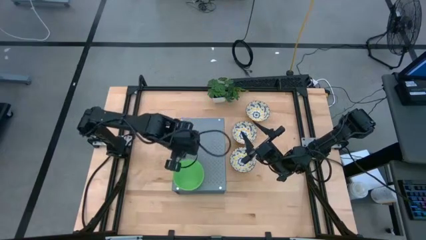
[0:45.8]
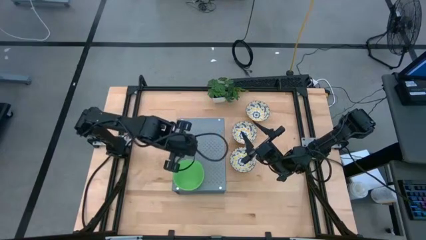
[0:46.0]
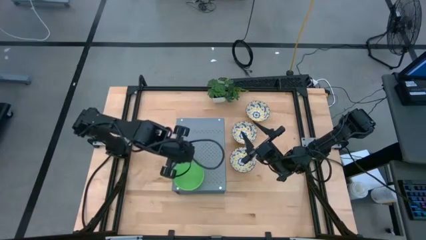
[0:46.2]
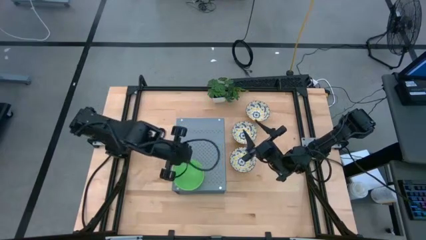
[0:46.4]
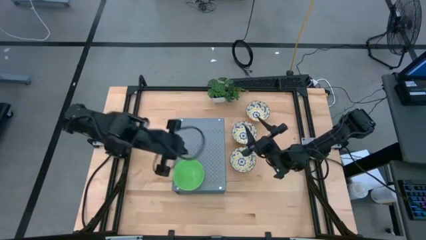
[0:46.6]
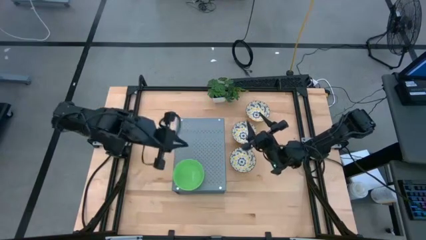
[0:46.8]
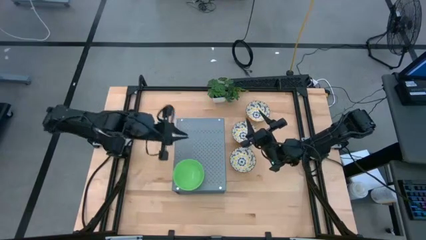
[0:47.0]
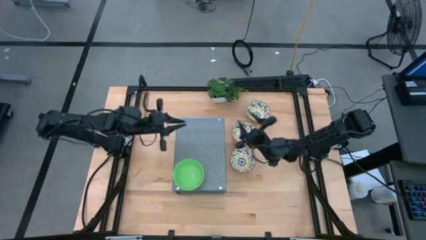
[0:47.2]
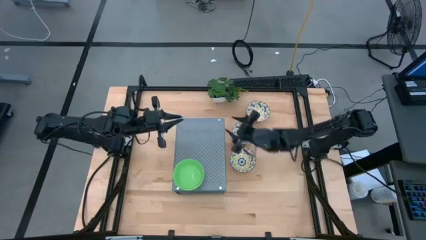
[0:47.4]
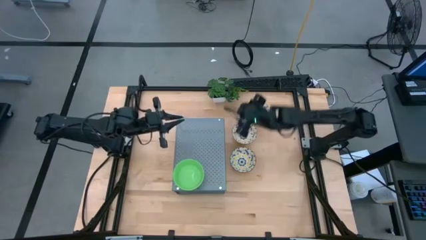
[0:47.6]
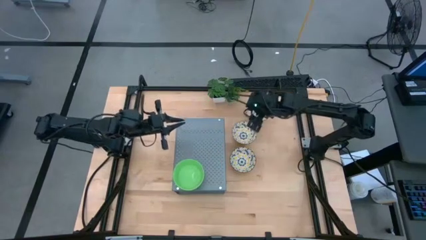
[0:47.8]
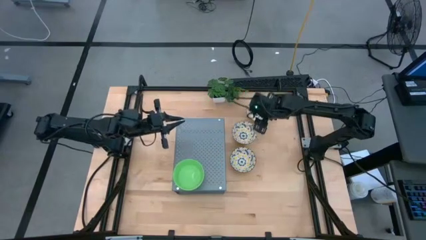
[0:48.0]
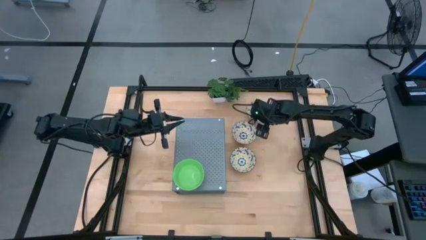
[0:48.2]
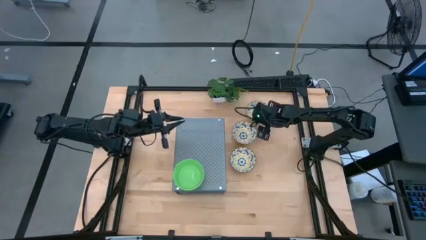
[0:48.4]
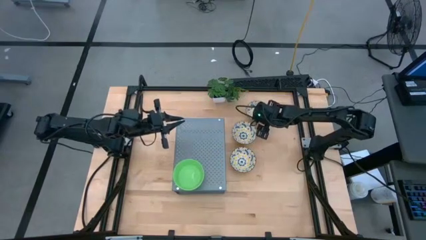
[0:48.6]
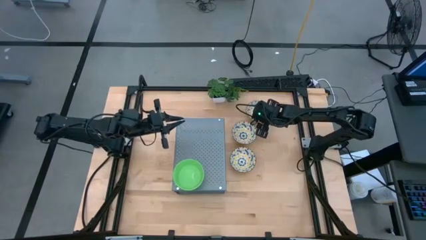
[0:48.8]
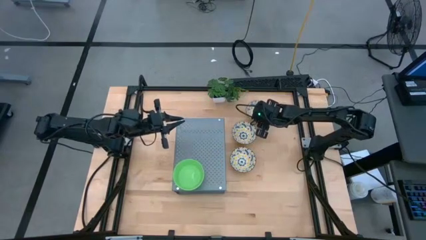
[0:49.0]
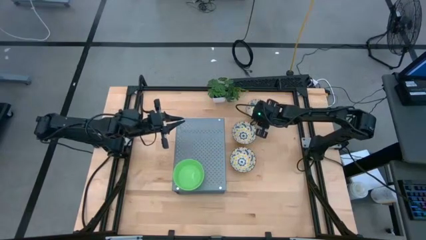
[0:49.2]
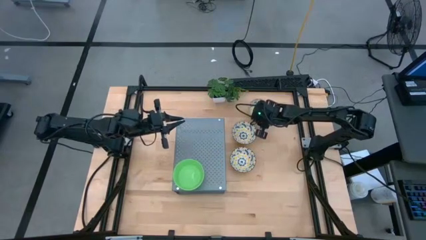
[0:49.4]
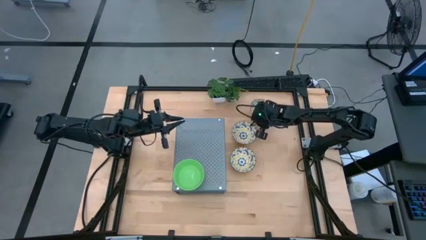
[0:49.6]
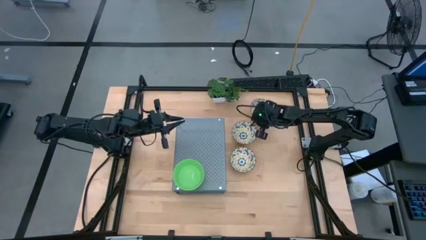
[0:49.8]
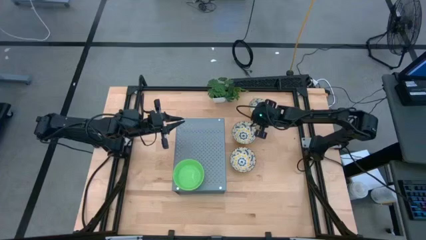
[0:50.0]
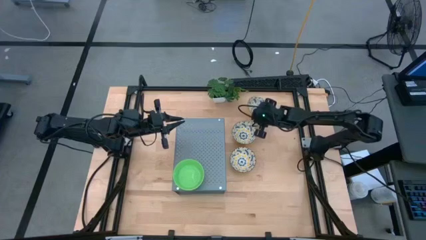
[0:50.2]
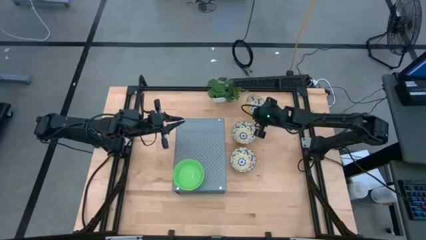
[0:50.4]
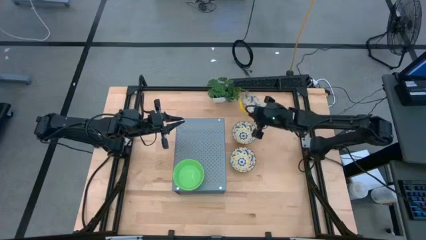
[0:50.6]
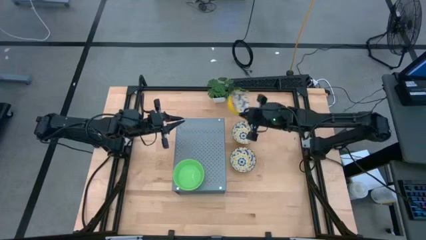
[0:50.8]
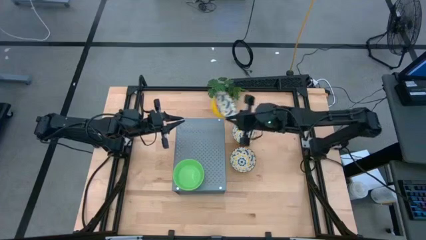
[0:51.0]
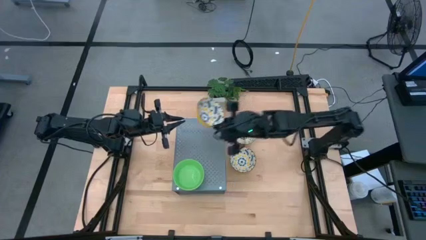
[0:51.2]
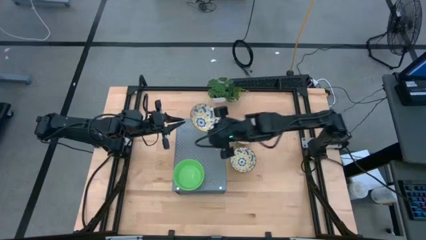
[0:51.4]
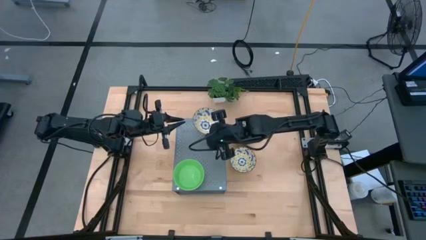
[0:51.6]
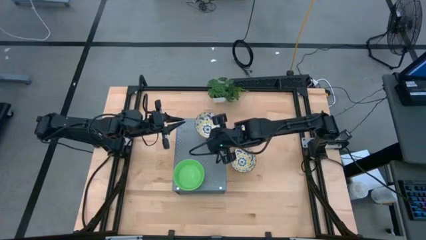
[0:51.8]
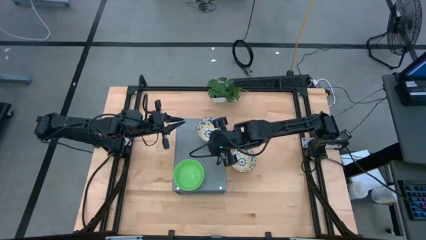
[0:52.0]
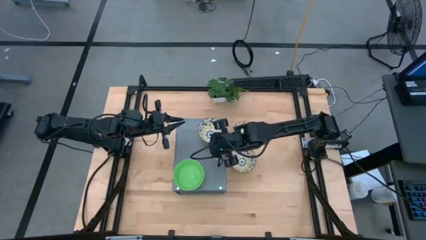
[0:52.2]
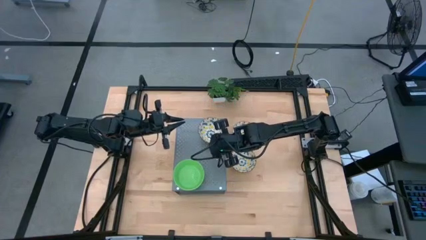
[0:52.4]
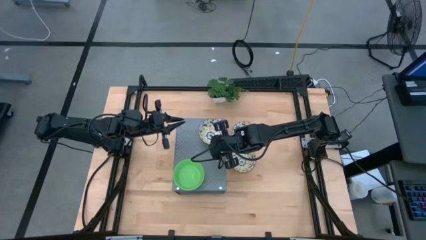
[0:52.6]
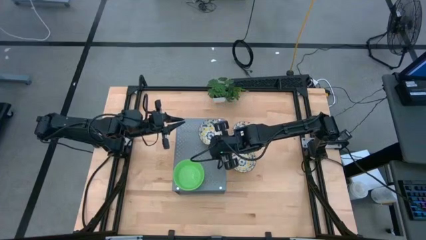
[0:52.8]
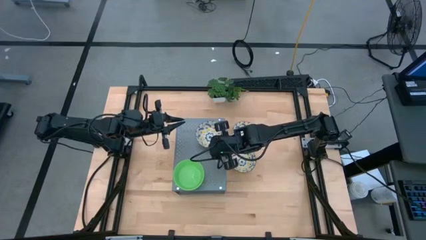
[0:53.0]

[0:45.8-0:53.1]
Task: Pick & Place Mini bowls
Put the top white patterned bowl on the shelf

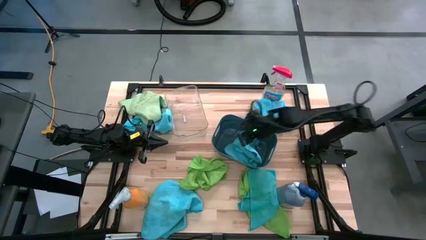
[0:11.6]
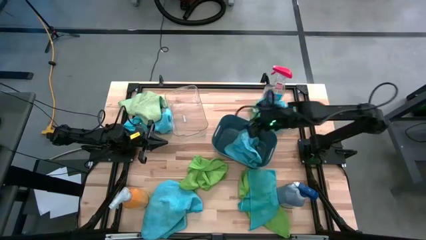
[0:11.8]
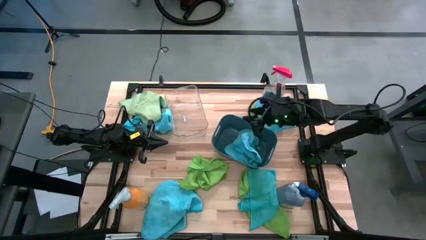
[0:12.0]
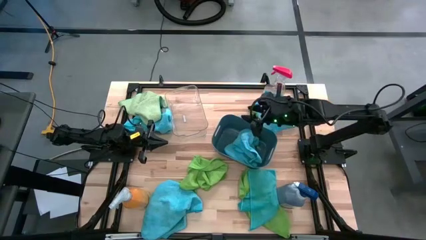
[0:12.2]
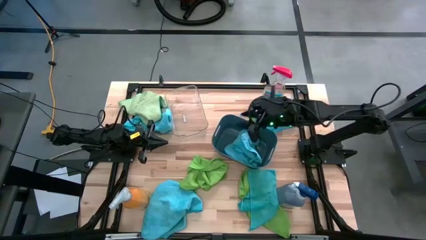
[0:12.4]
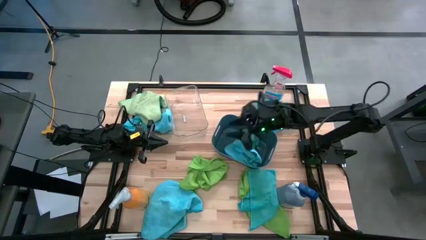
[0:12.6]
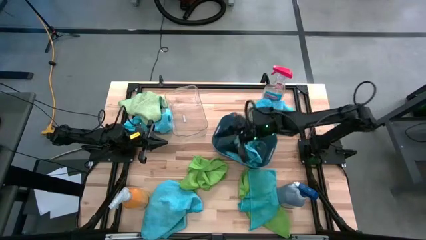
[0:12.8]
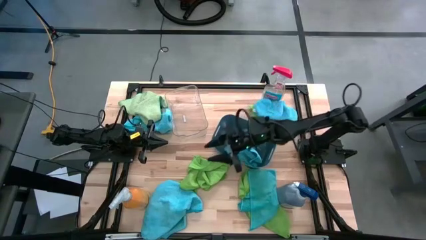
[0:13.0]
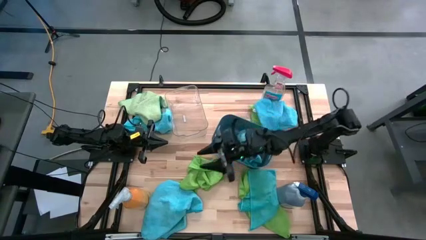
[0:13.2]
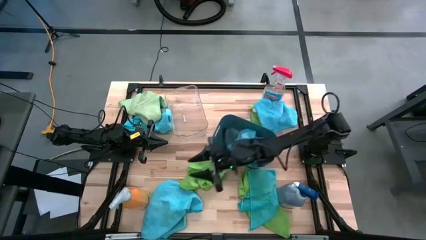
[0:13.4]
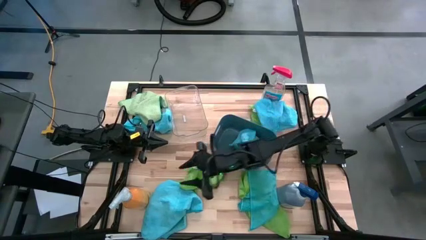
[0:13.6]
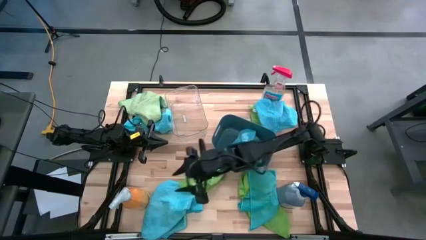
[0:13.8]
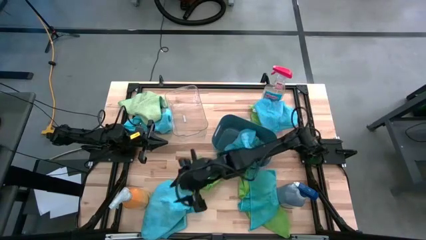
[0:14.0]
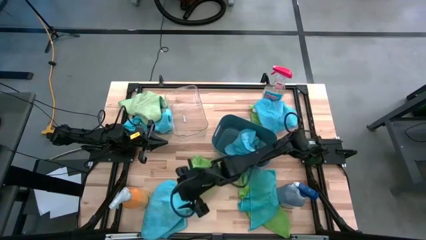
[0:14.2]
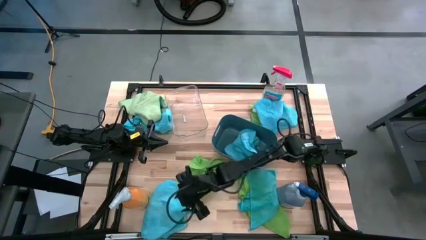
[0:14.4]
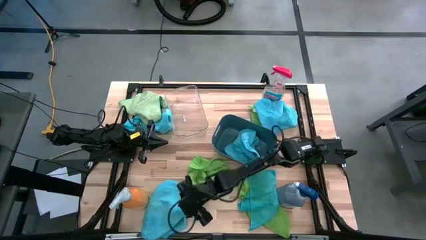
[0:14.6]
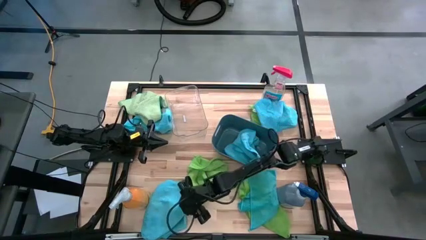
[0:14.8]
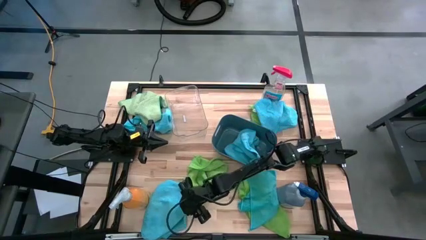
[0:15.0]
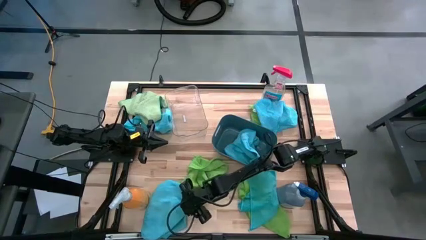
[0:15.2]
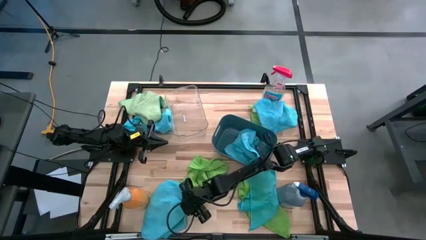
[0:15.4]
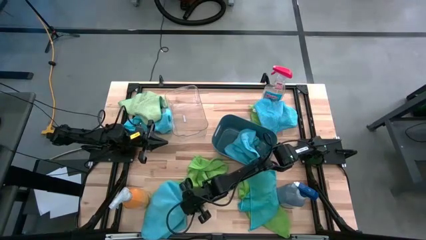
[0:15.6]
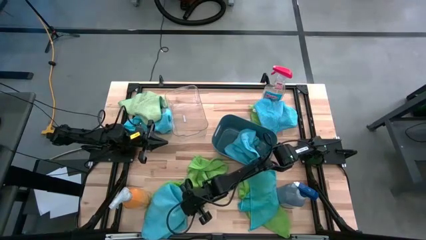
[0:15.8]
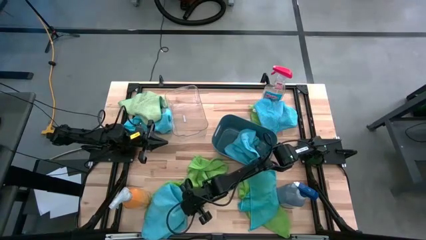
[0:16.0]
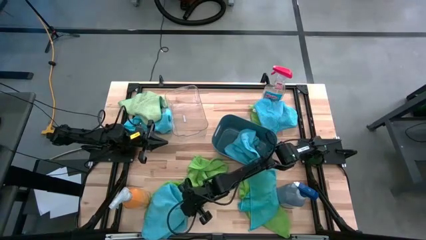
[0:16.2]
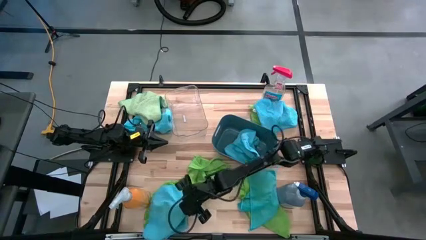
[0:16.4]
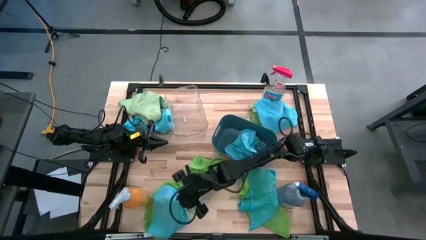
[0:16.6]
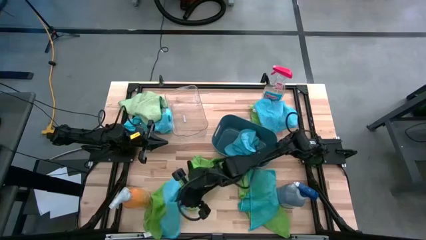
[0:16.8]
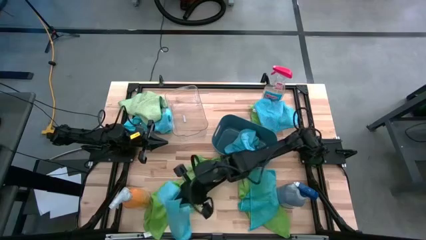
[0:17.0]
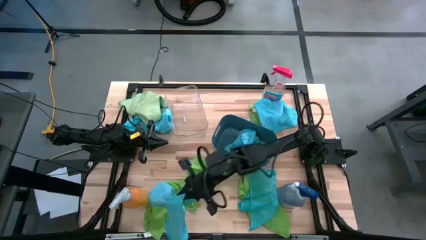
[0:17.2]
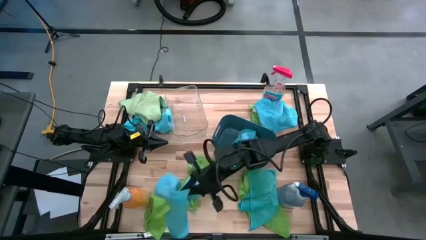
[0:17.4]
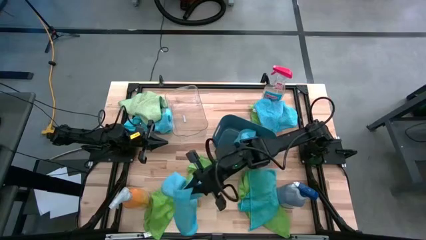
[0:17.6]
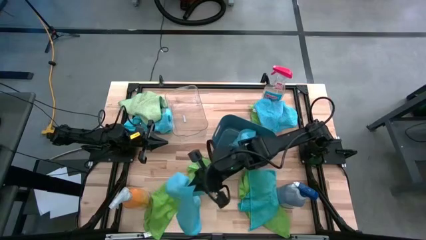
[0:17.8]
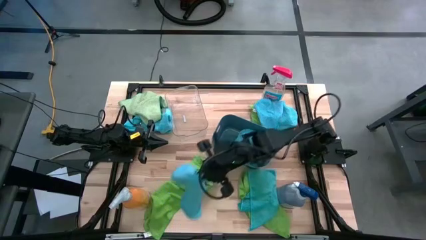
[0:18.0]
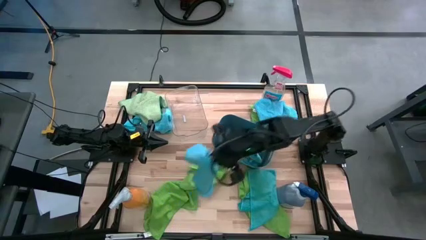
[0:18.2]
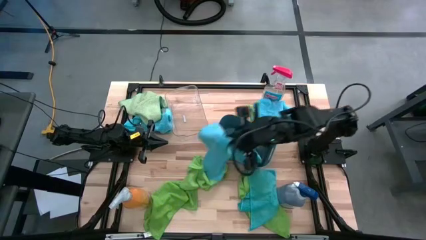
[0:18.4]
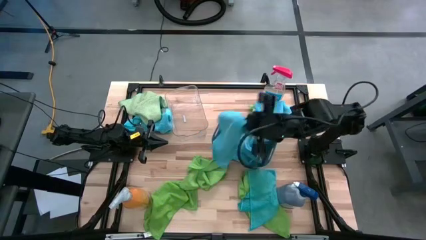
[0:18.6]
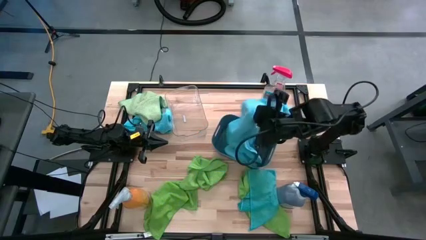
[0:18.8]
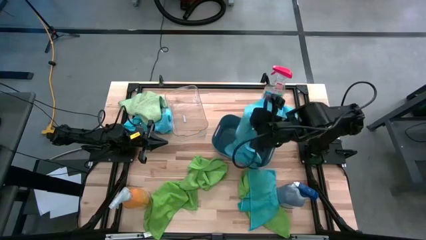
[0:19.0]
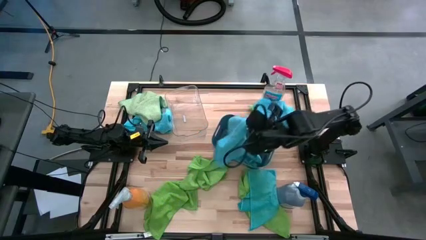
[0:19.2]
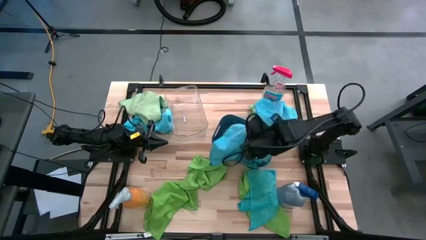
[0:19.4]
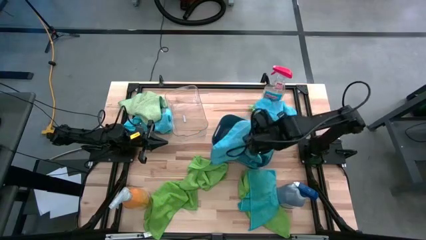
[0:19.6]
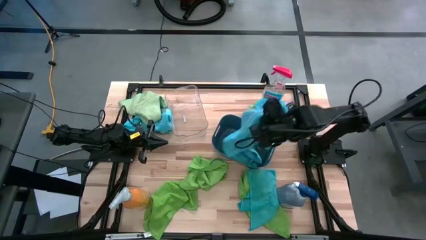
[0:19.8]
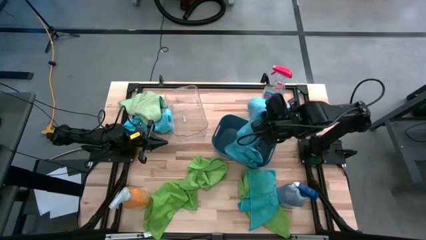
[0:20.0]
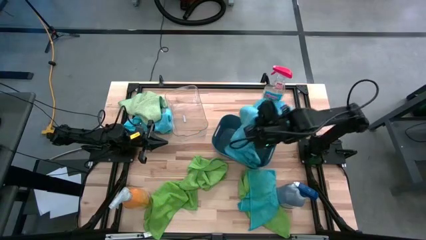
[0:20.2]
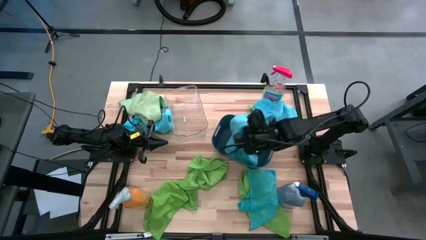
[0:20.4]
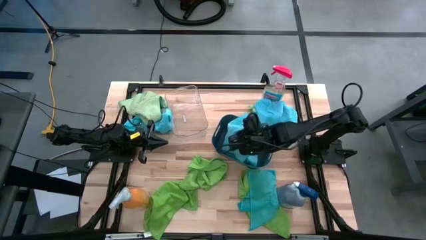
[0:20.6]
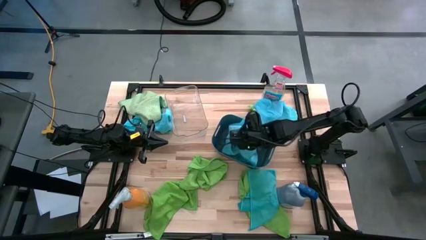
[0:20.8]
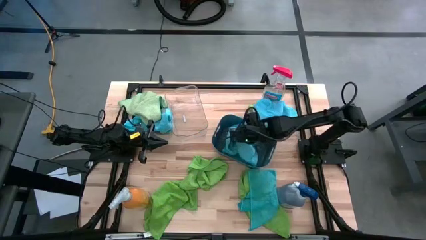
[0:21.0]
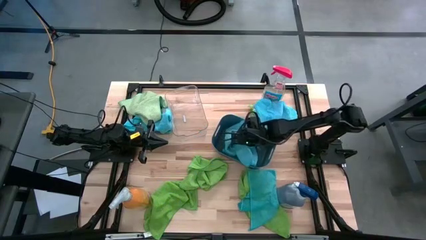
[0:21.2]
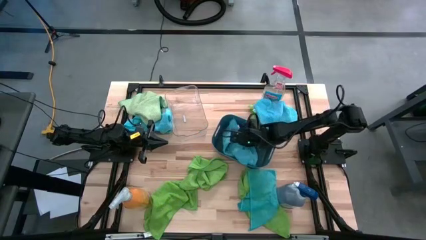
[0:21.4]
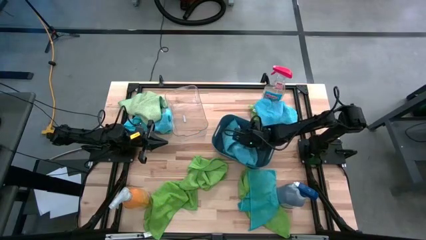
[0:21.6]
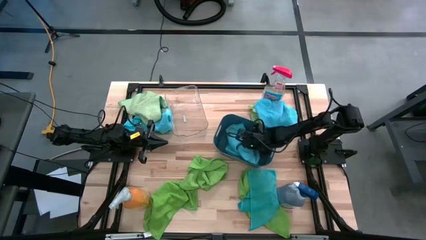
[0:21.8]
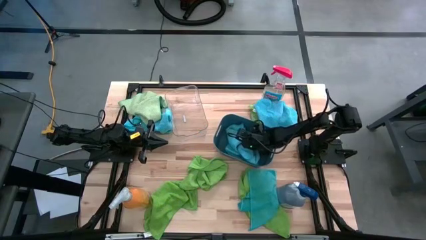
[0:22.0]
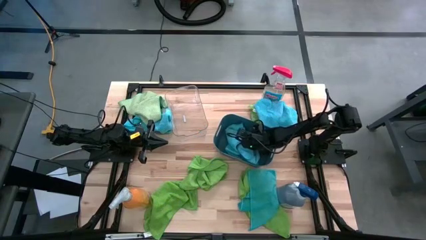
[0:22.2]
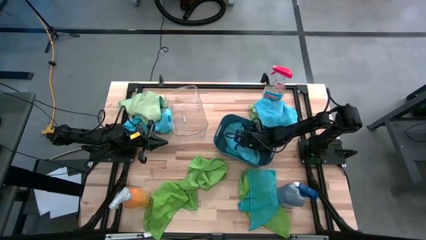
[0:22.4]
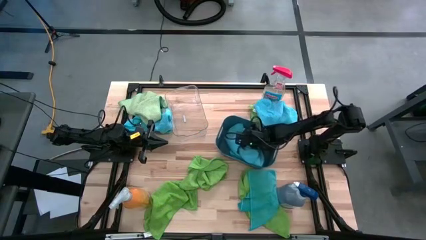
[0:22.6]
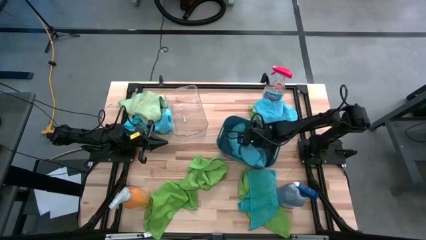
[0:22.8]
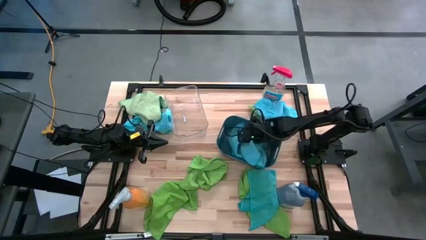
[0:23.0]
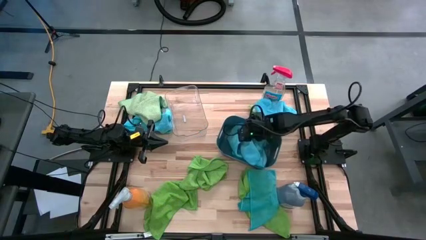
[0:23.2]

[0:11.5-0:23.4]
Task: Sort microfiber towel by color & place in baskets
Put the blue towel into the blue bin
